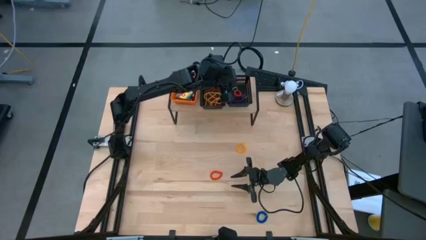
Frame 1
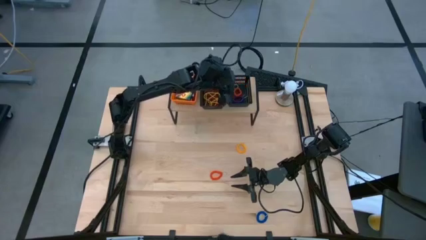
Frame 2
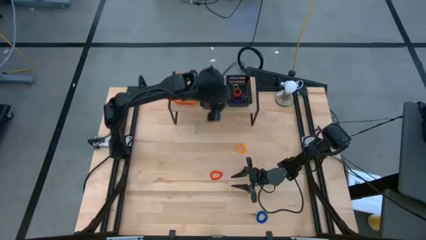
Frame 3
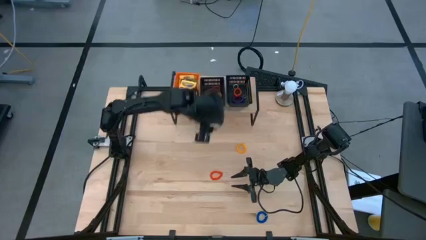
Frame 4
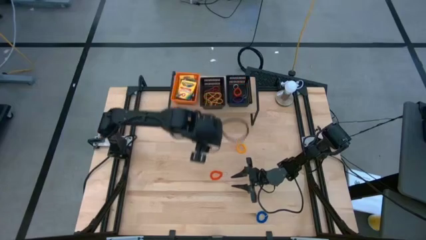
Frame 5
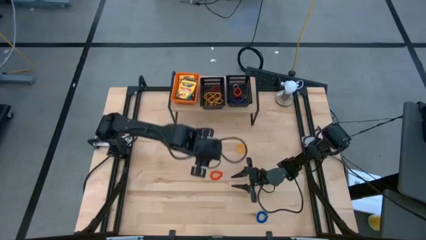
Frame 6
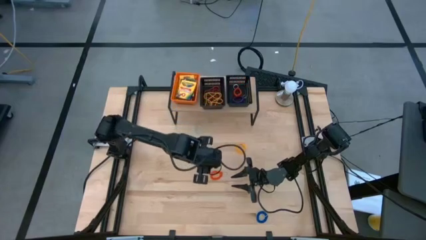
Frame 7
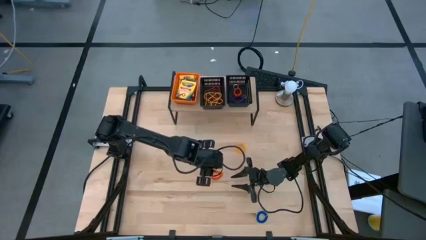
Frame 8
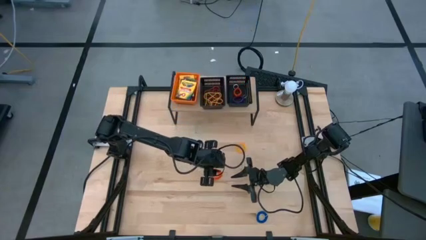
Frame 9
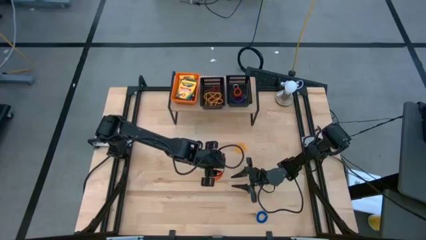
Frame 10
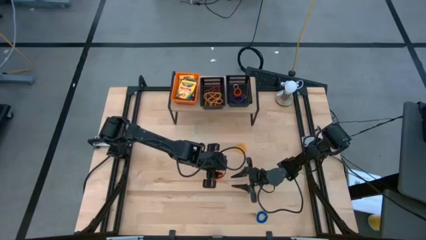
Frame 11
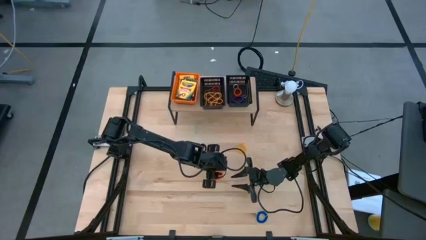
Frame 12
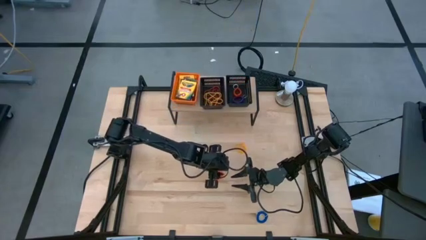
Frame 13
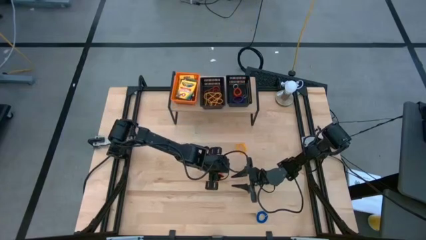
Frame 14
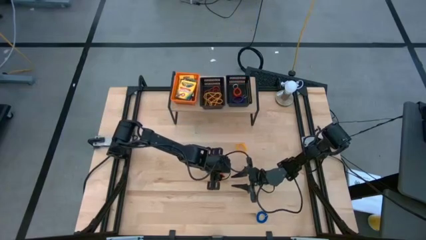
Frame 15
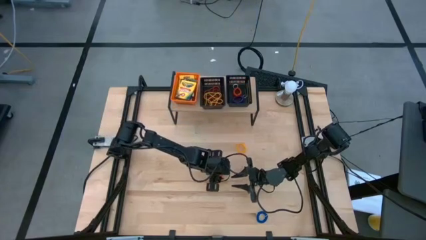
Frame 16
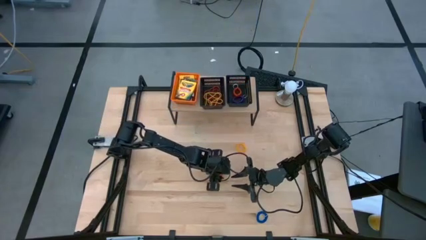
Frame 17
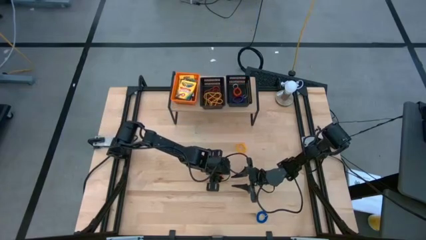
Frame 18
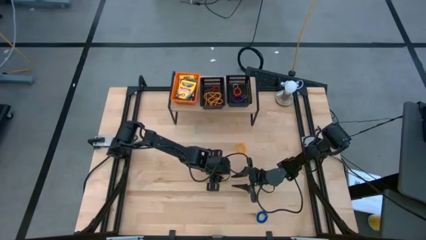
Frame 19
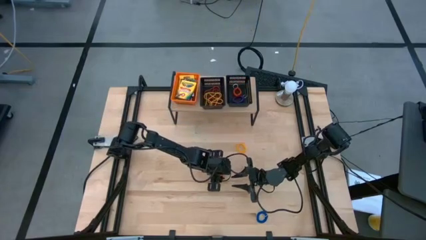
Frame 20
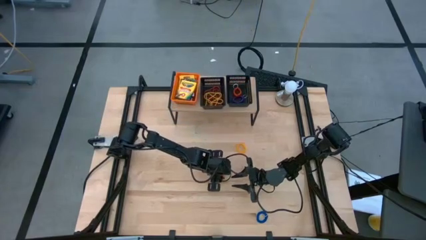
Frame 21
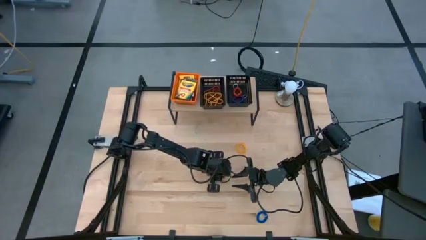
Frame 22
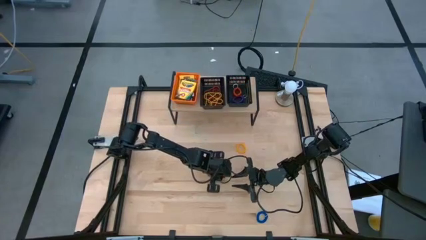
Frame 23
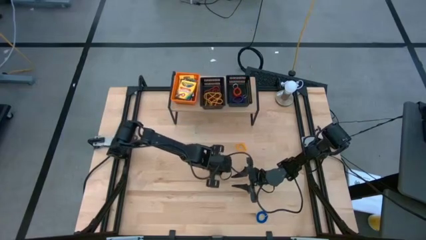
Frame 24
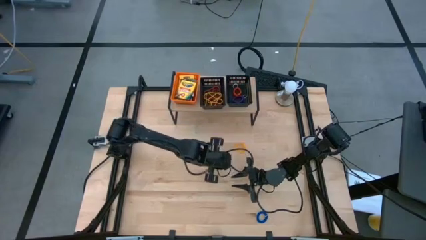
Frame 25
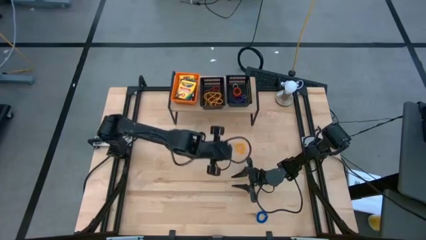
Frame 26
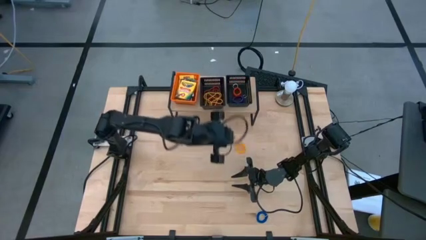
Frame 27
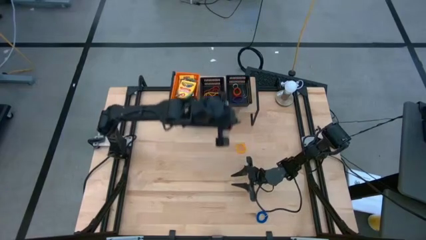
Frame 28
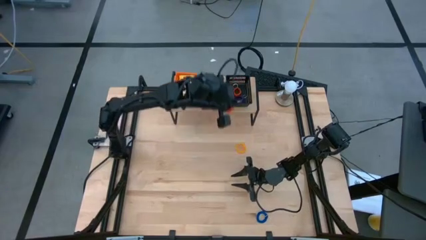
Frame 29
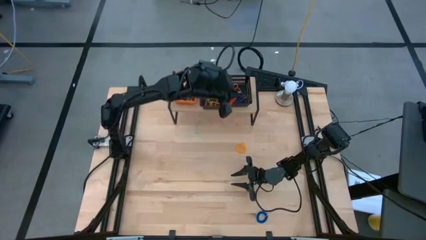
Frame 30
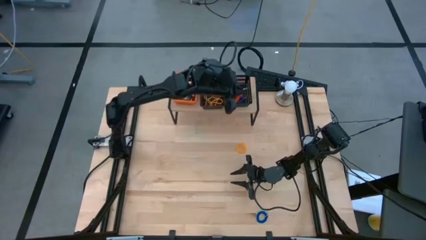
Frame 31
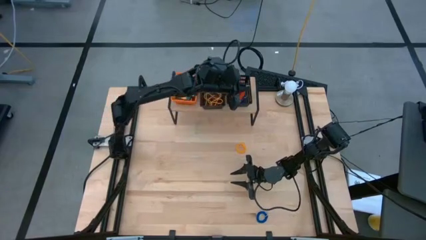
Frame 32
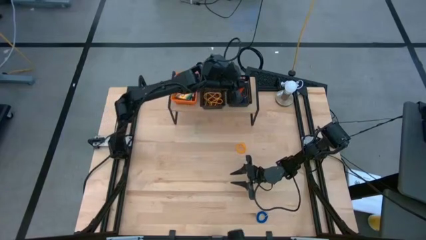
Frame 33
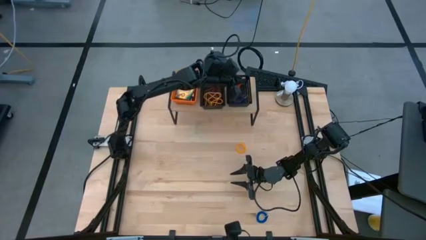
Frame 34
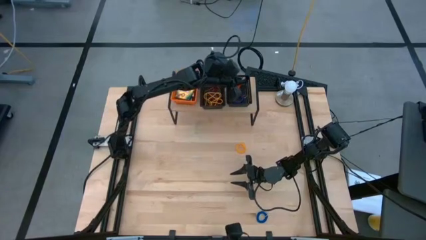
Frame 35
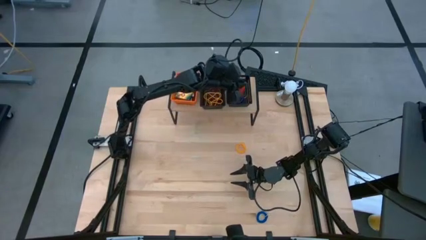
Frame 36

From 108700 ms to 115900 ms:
Task: Pick & Place Office Desk Supplies
Put the orange spring keychain into the right black basket on the shelf

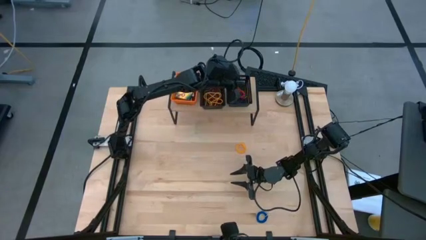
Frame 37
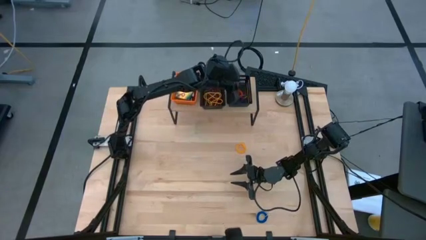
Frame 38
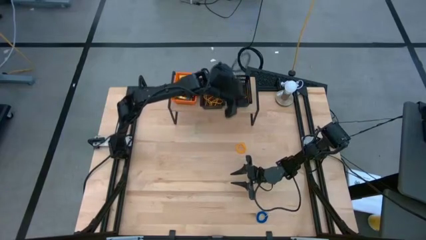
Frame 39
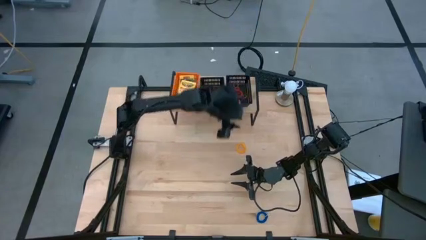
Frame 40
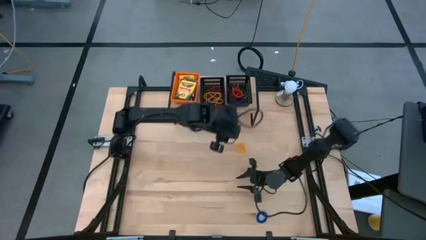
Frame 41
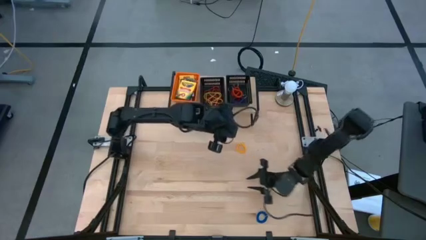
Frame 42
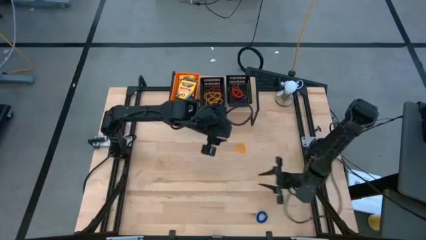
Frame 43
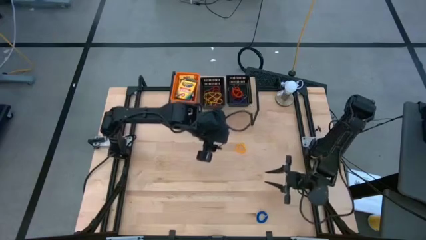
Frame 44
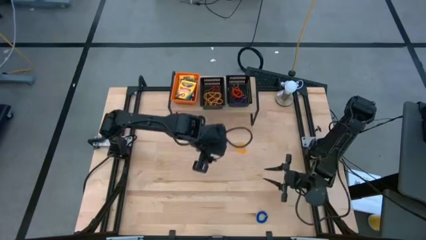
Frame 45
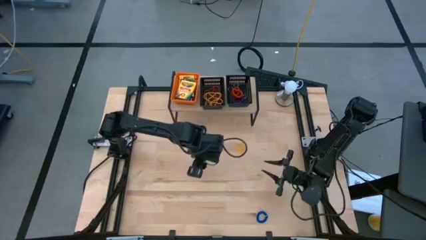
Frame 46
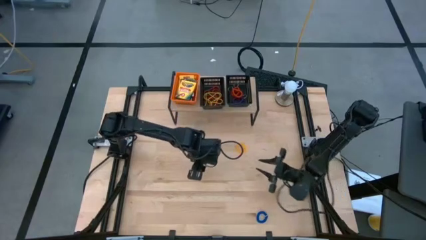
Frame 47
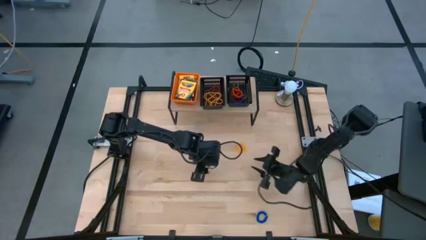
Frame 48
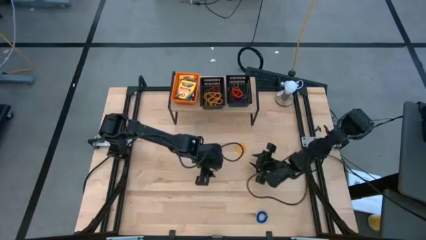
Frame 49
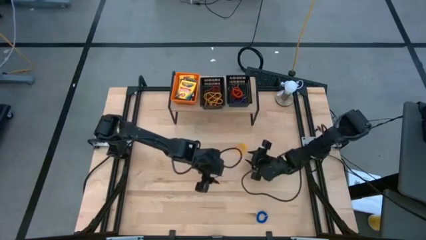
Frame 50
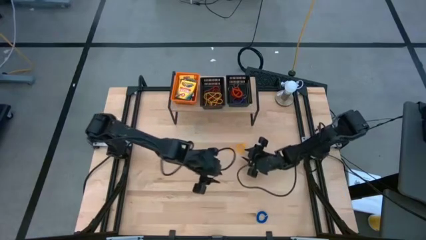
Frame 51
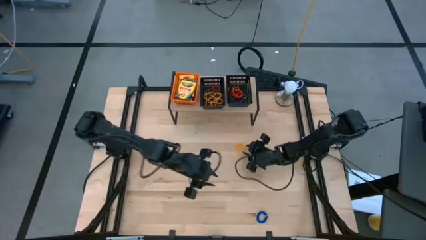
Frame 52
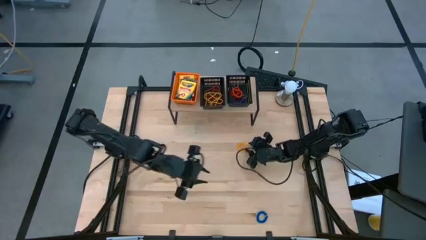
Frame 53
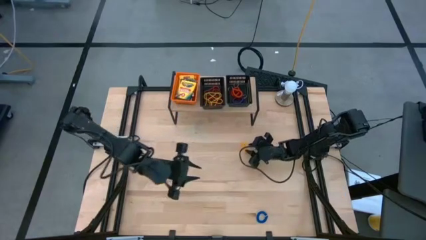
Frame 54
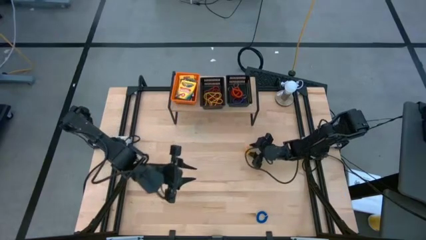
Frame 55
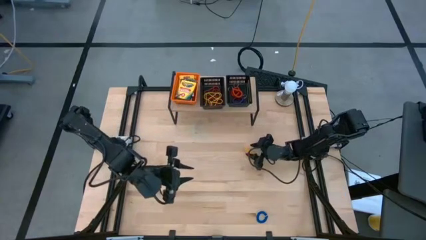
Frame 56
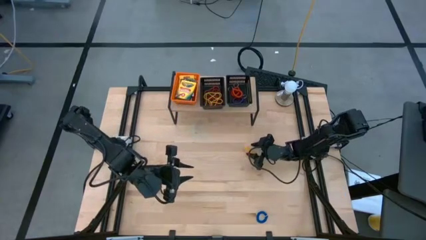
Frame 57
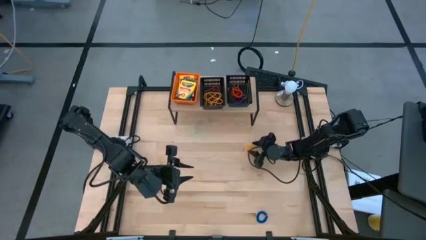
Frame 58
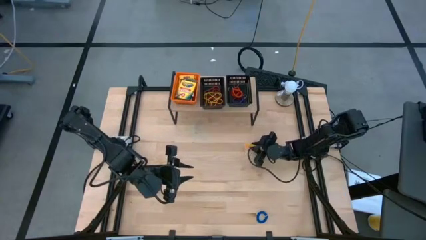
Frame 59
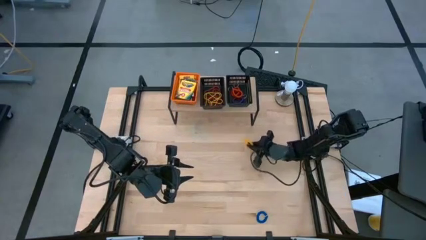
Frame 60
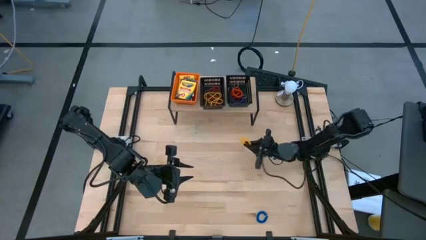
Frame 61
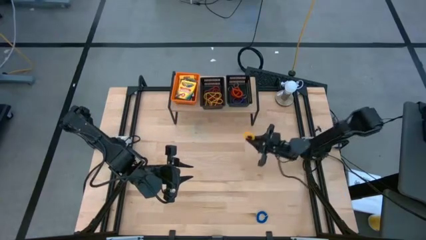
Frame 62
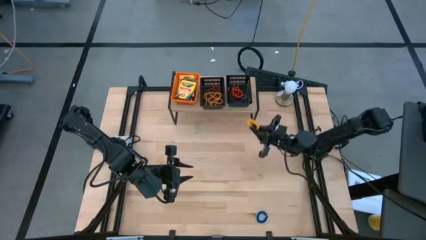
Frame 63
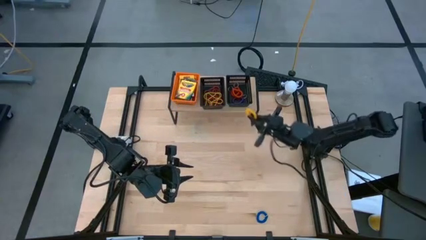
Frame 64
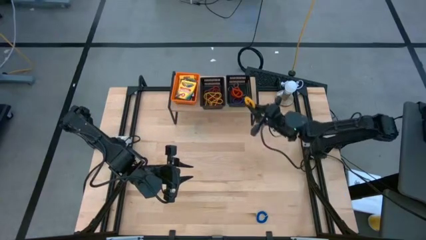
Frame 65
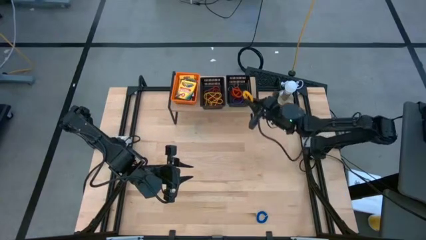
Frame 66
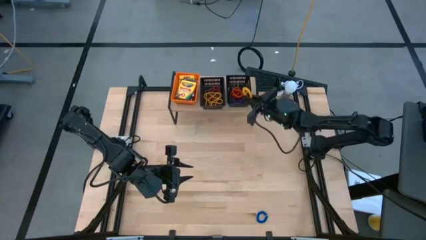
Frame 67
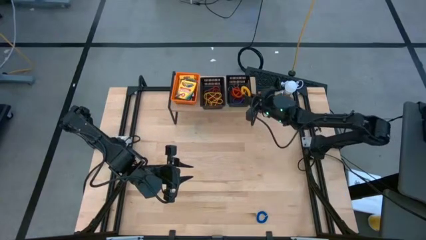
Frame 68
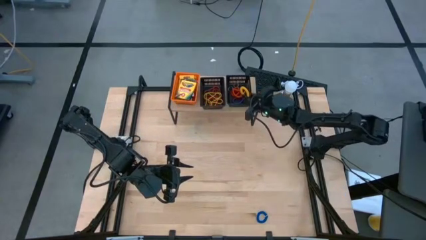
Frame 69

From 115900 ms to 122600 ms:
Put the yellow spring keychain into the right black basket on the shelf
